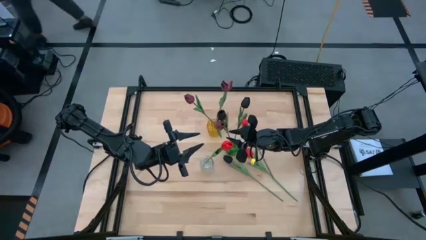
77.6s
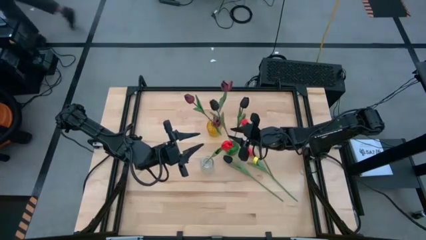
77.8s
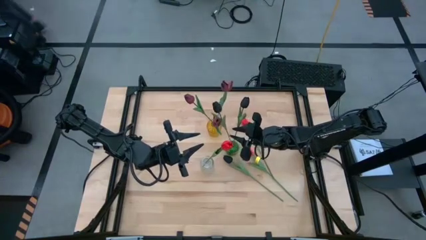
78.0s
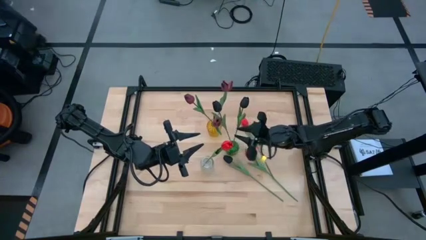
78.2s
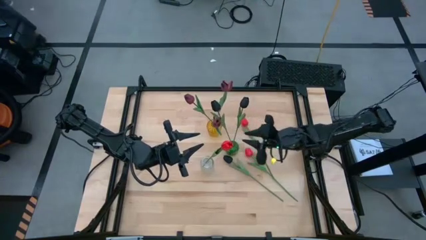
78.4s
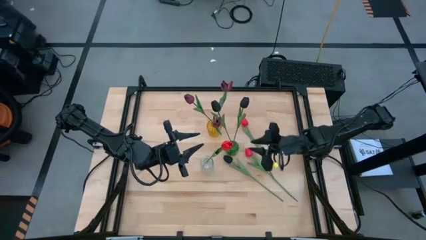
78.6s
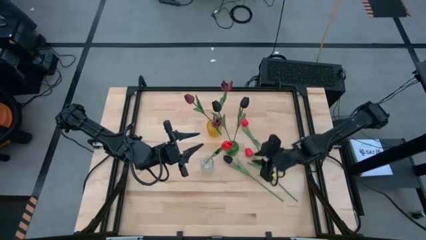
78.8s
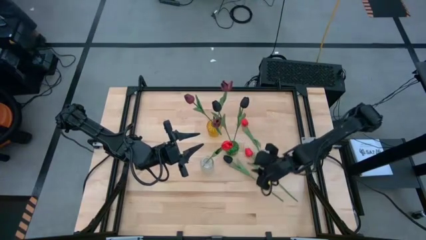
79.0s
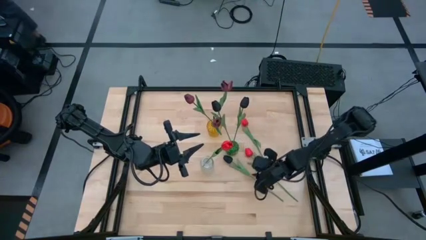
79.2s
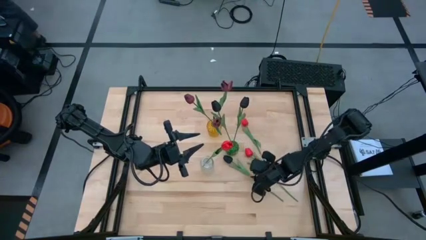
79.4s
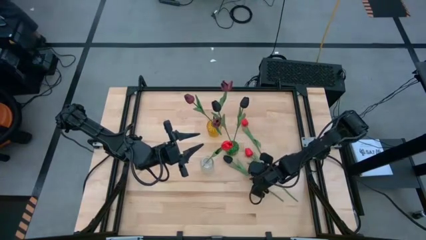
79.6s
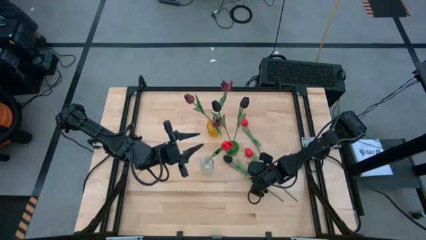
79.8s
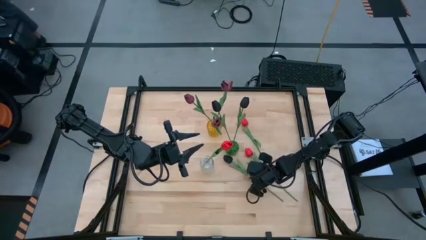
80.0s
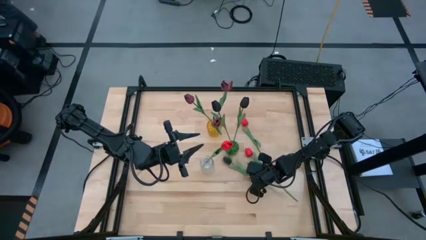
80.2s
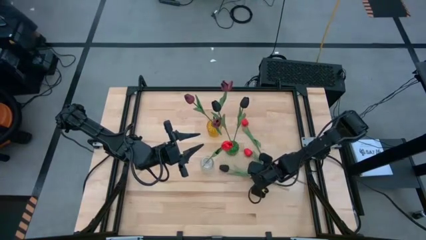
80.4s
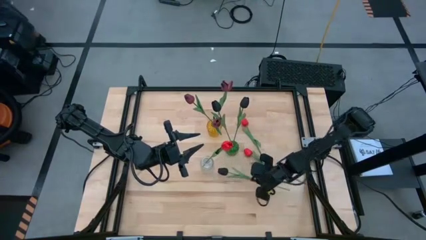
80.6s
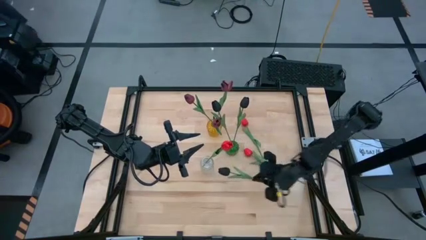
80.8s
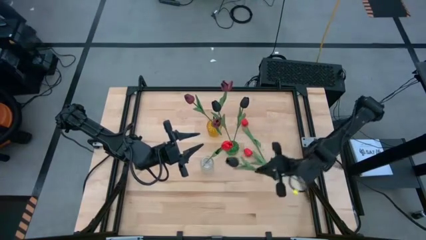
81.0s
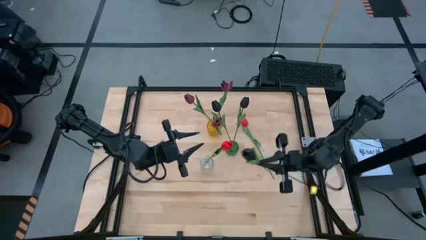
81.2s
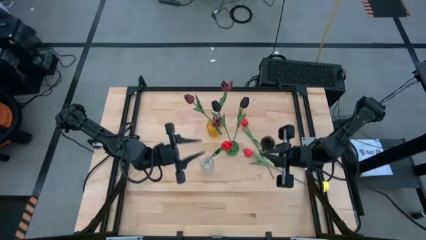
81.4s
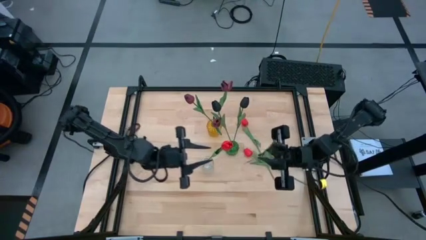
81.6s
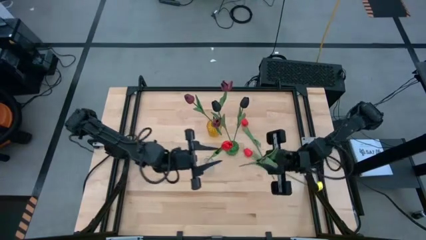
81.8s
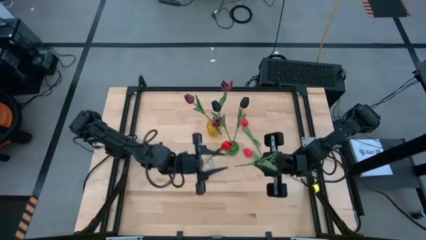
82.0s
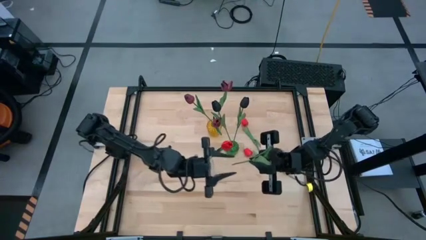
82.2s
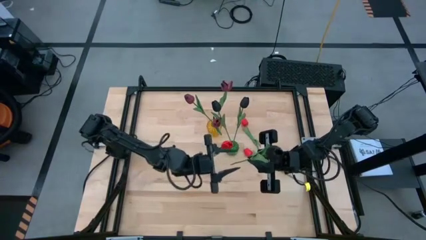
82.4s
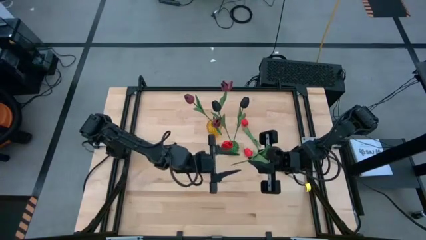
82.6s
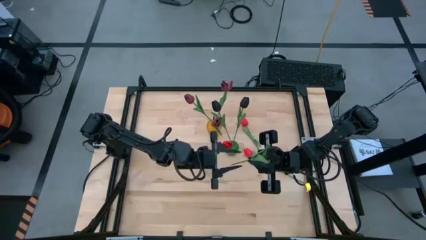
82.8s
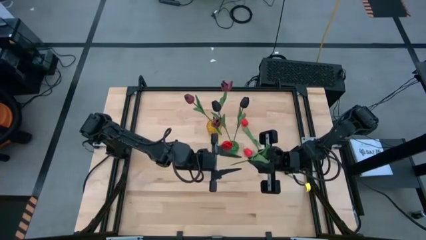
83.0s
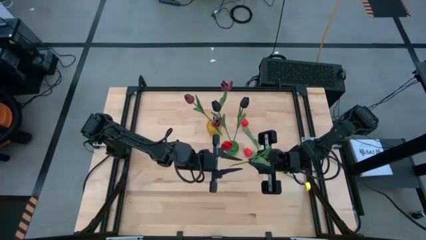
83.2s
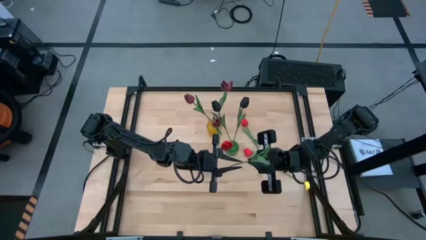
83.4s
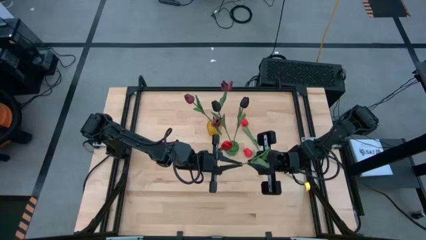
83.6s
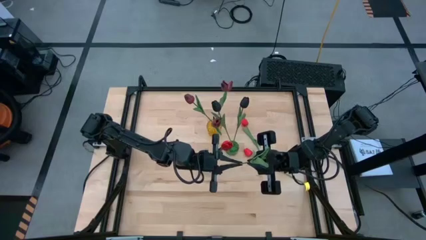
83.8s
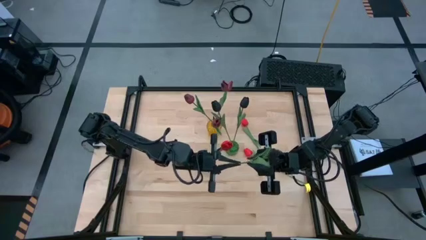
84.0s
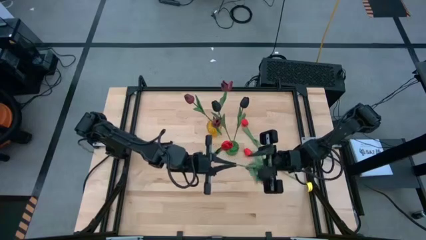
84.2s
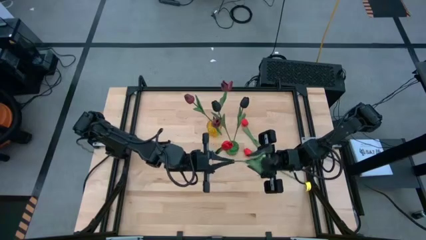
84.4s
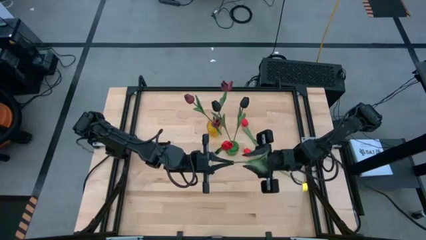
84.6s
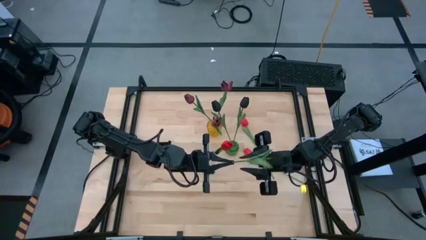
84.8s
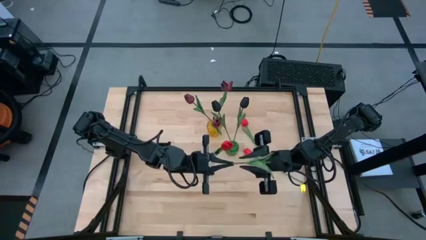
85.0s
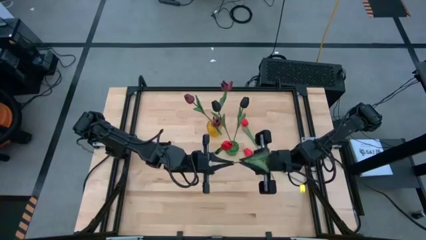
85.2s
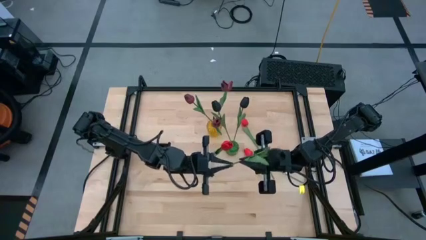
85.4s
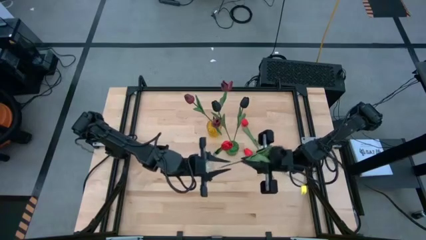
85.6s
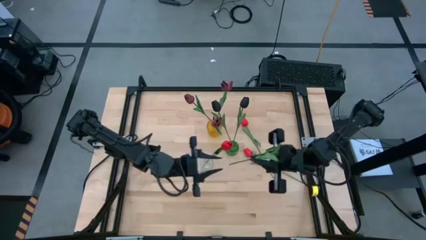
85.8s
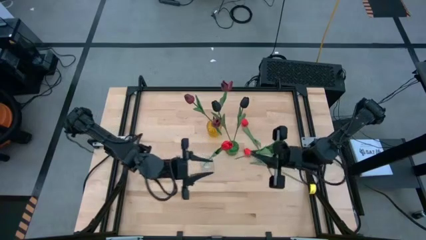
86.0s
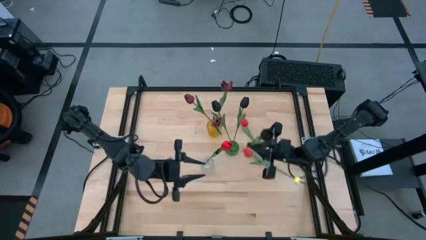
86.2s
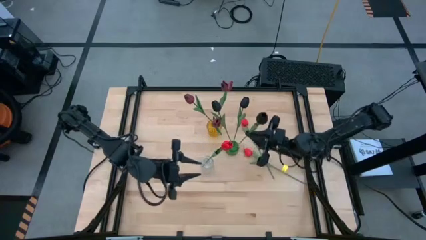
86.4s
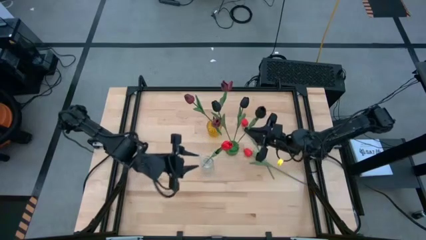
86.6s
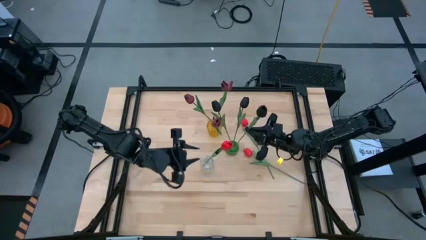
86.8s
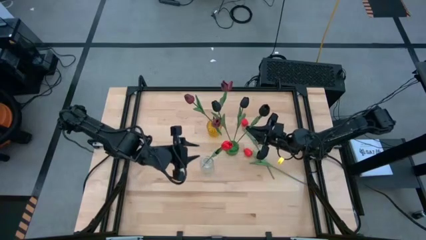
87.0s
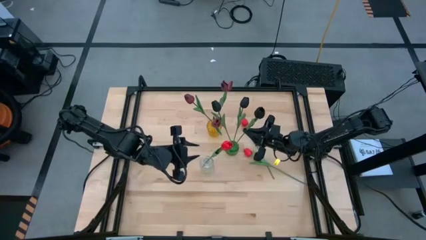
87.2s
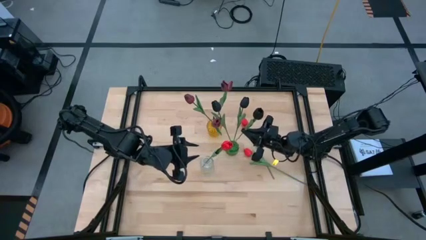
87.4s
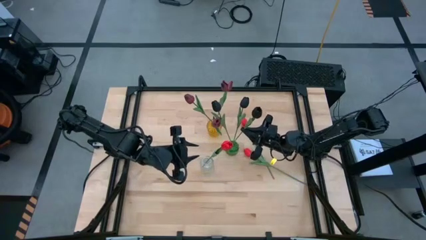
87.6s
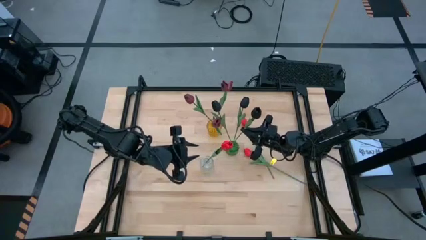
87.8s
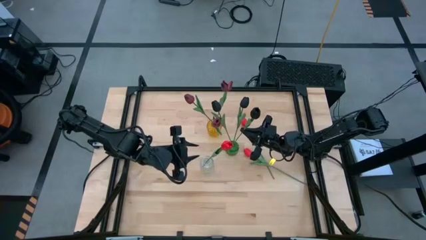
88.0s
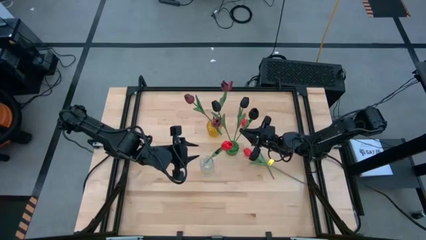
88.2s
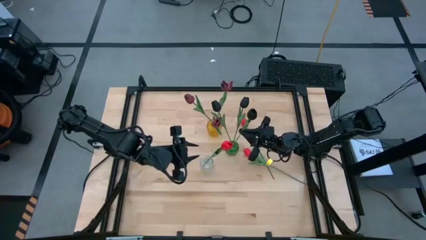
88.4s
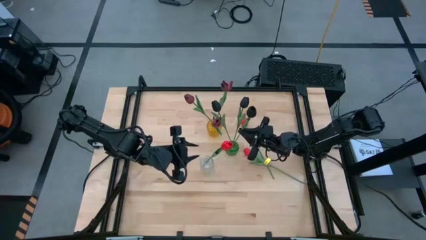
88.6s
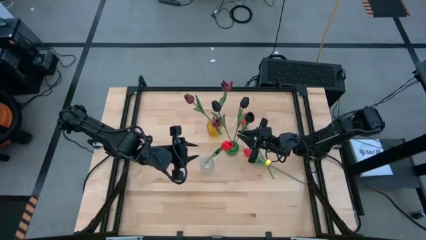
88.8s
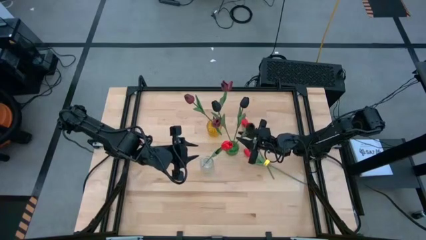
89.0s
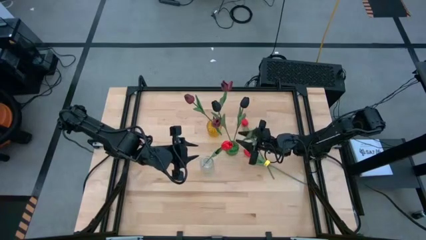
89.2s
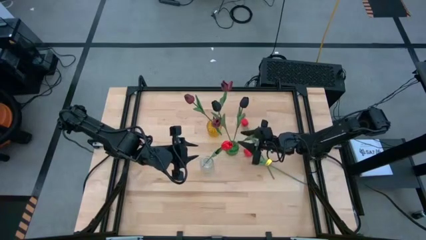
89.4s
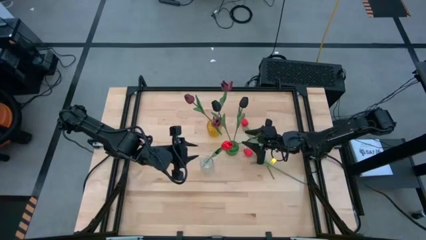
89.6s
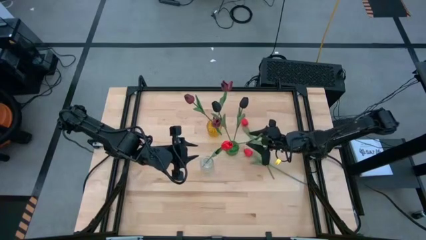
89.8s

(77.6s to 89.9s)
Task: Sort flowers into vase by color
Put the bottom black flower in the green flower vase
